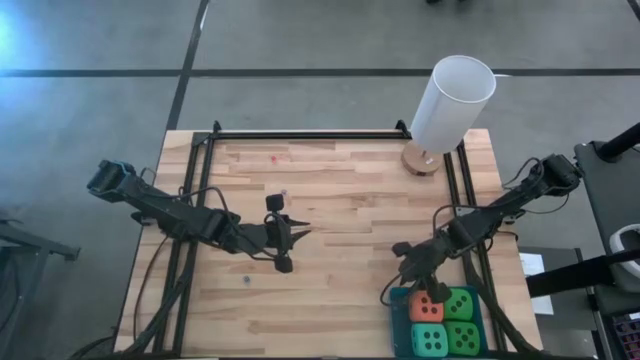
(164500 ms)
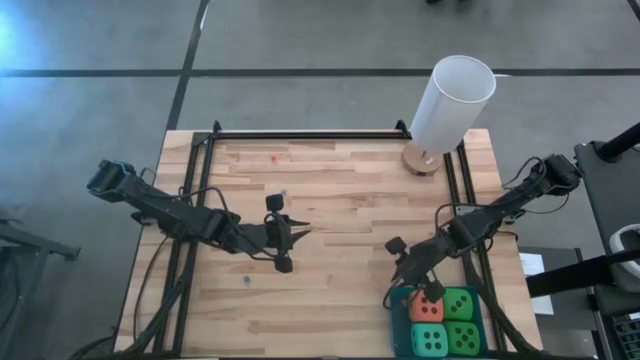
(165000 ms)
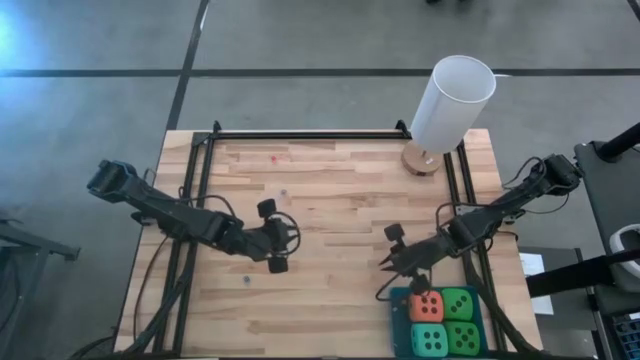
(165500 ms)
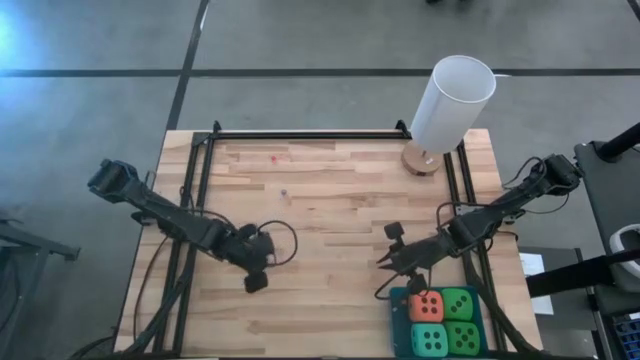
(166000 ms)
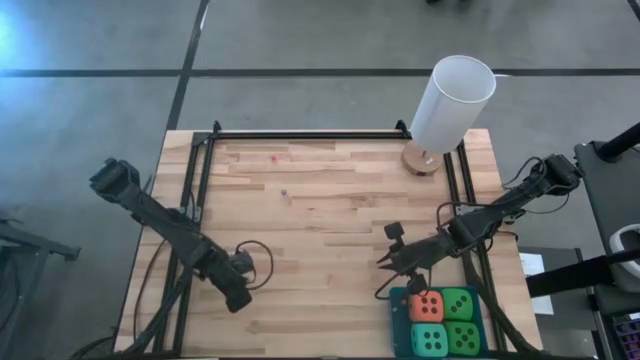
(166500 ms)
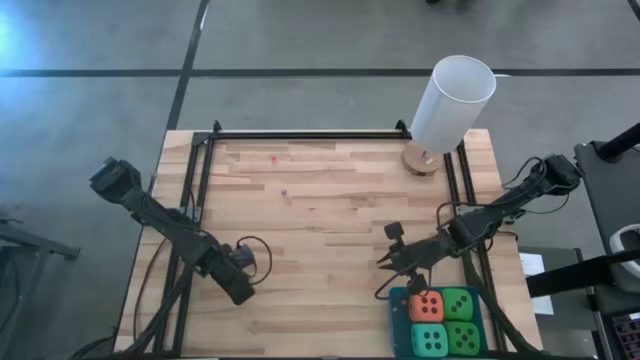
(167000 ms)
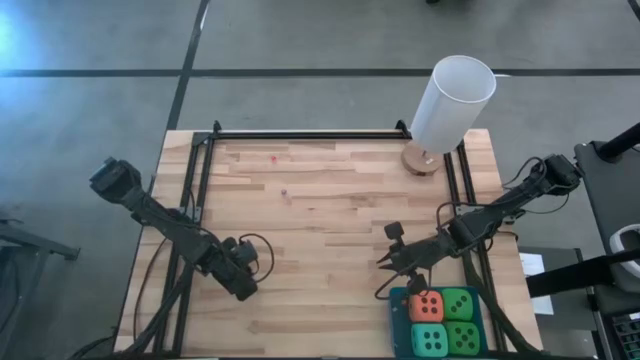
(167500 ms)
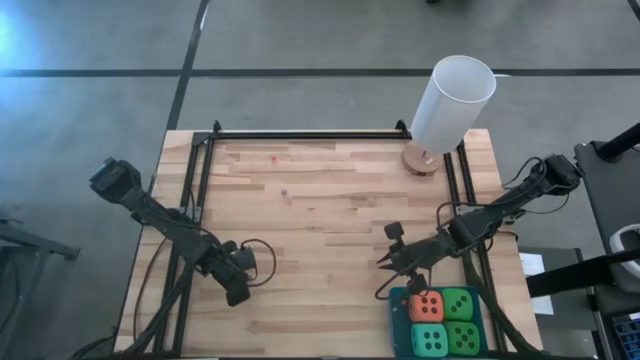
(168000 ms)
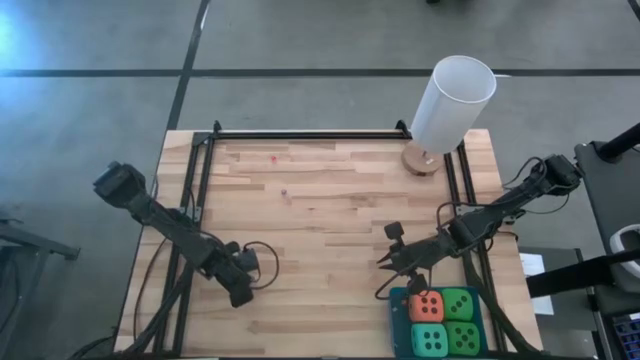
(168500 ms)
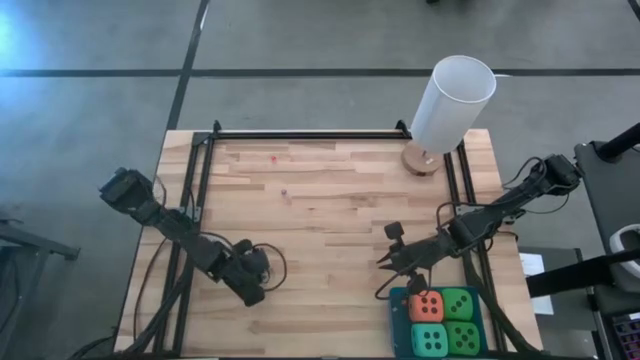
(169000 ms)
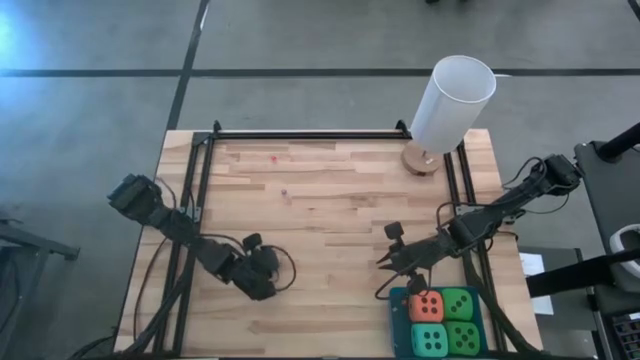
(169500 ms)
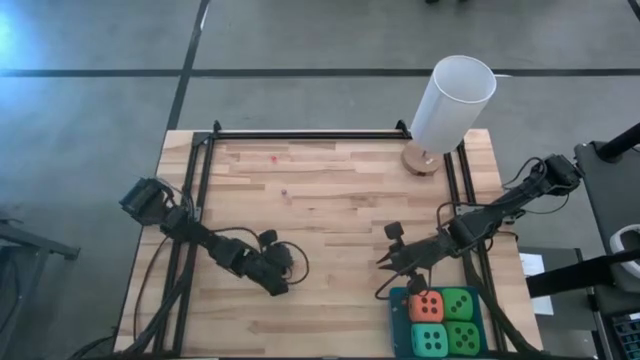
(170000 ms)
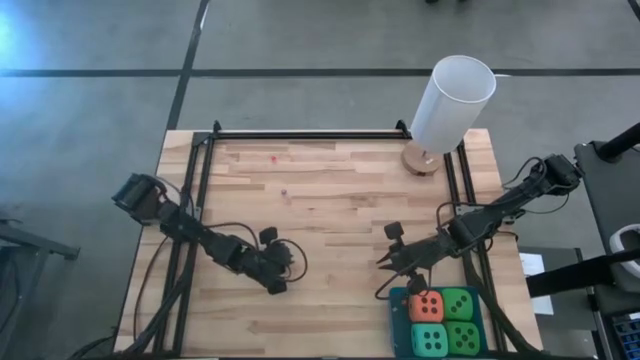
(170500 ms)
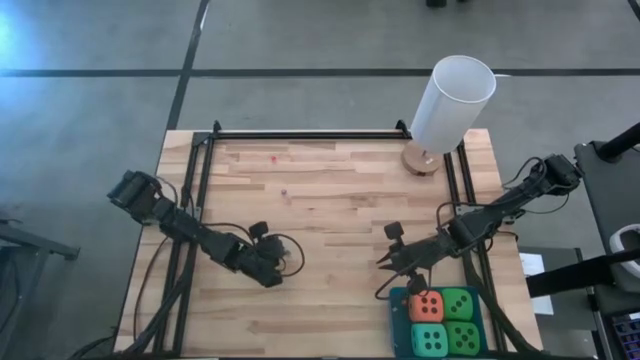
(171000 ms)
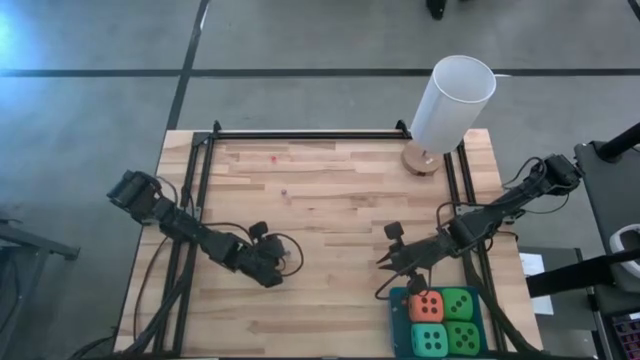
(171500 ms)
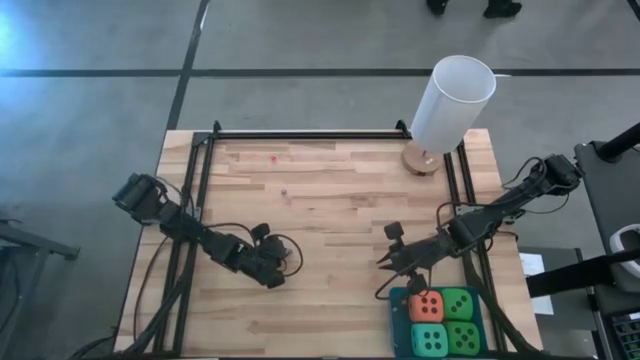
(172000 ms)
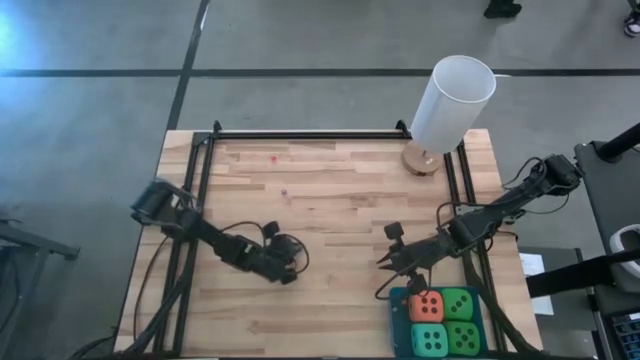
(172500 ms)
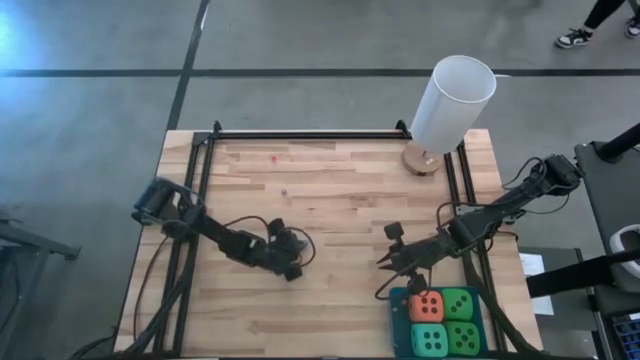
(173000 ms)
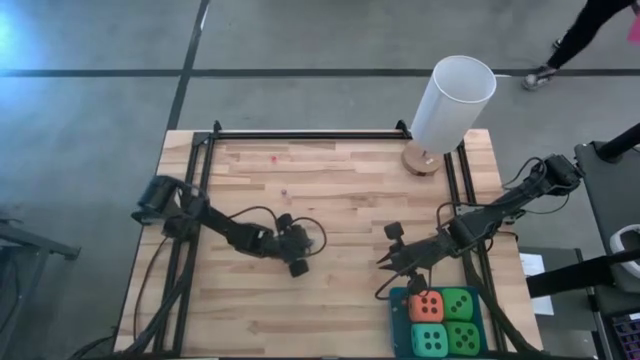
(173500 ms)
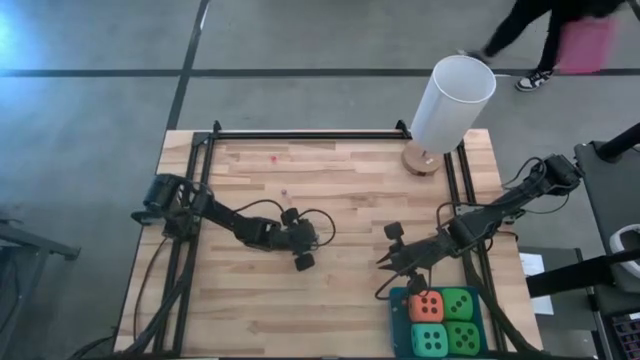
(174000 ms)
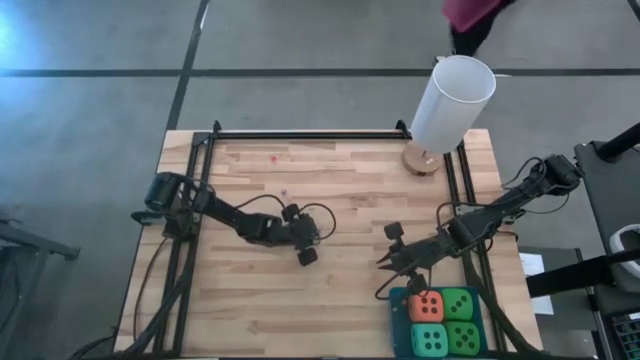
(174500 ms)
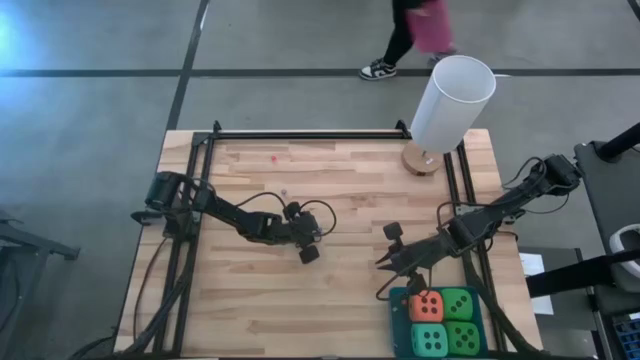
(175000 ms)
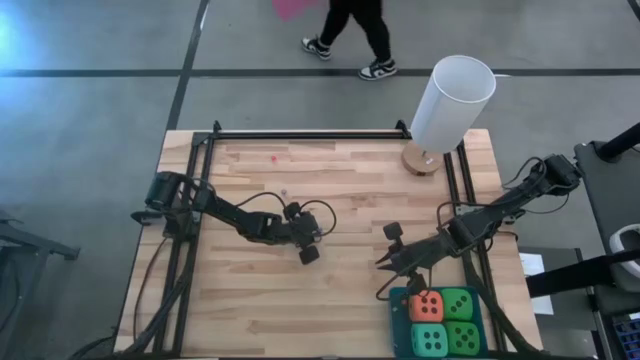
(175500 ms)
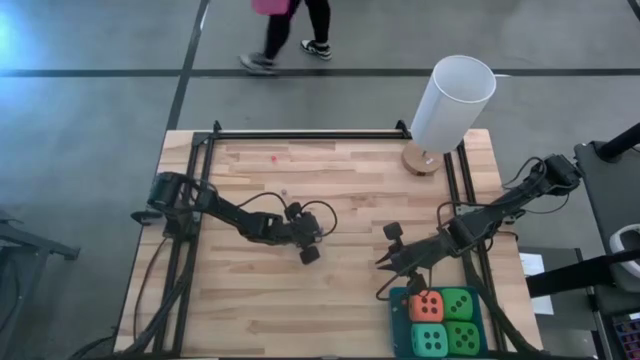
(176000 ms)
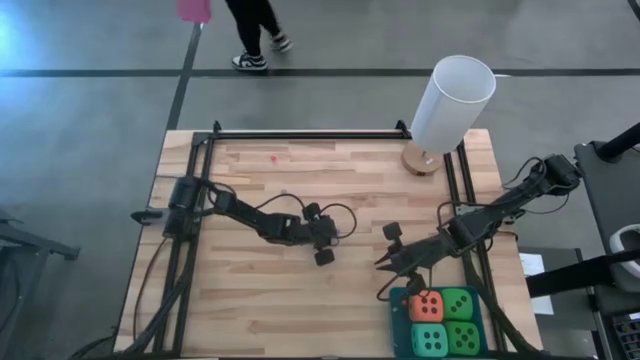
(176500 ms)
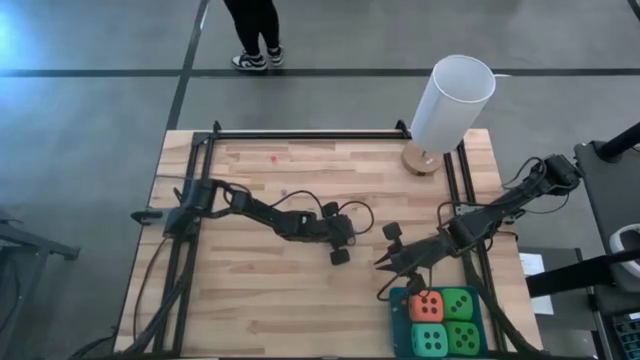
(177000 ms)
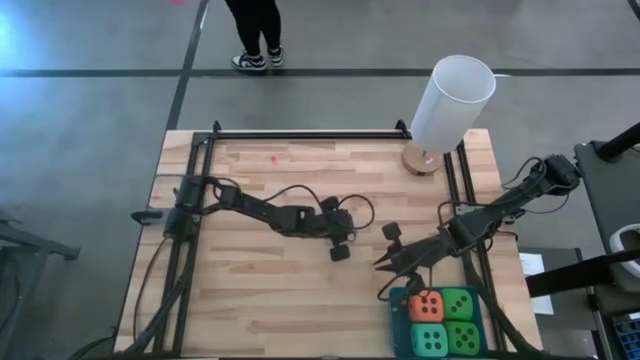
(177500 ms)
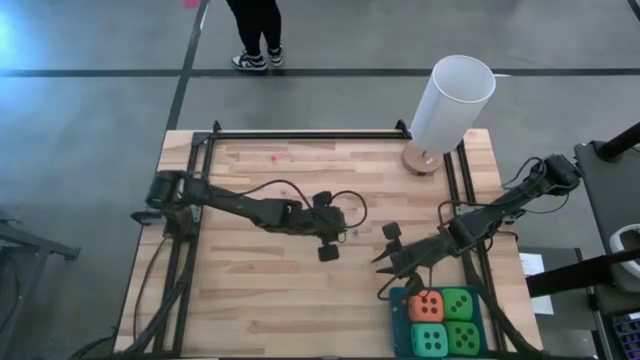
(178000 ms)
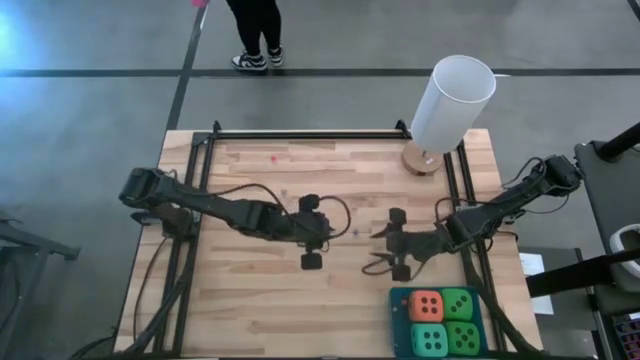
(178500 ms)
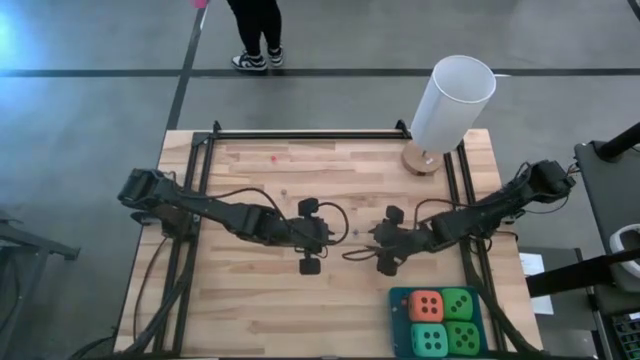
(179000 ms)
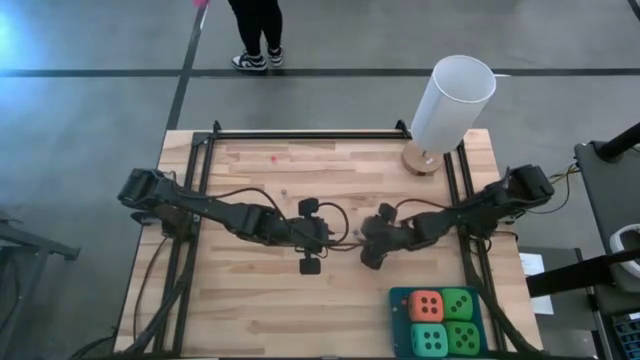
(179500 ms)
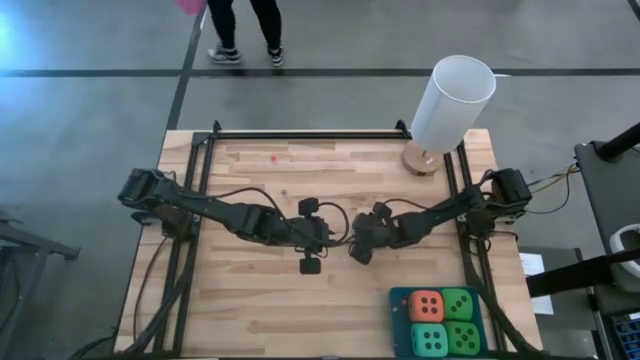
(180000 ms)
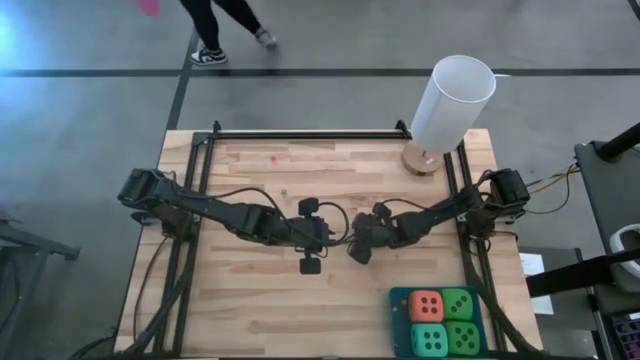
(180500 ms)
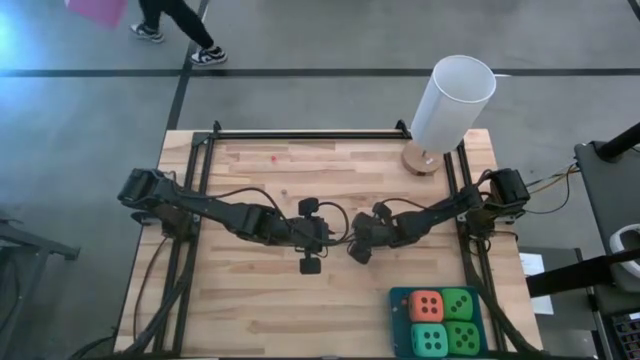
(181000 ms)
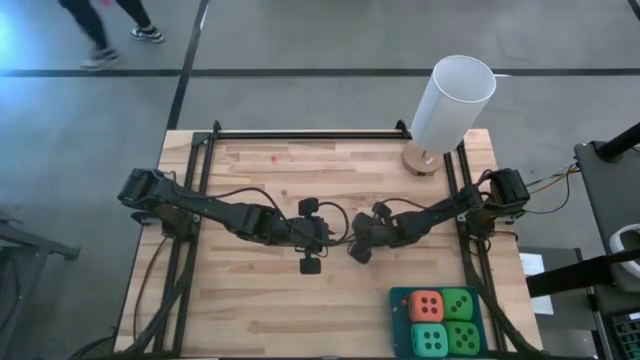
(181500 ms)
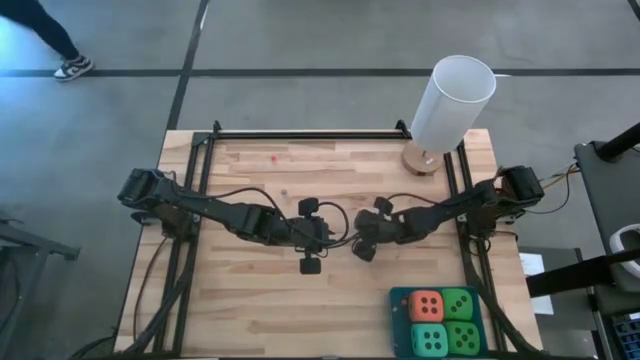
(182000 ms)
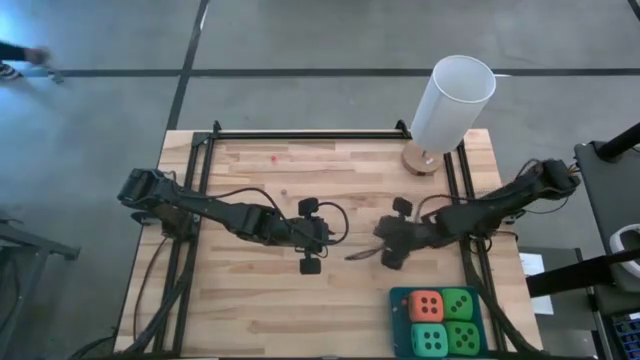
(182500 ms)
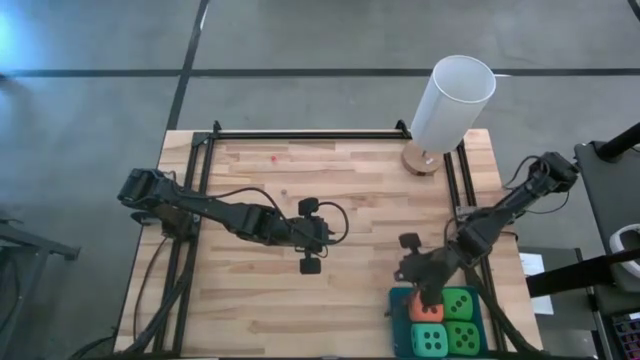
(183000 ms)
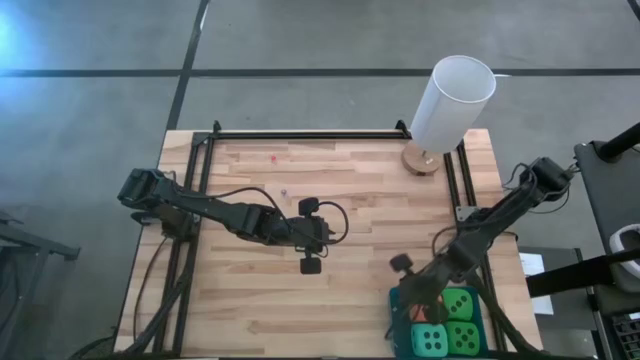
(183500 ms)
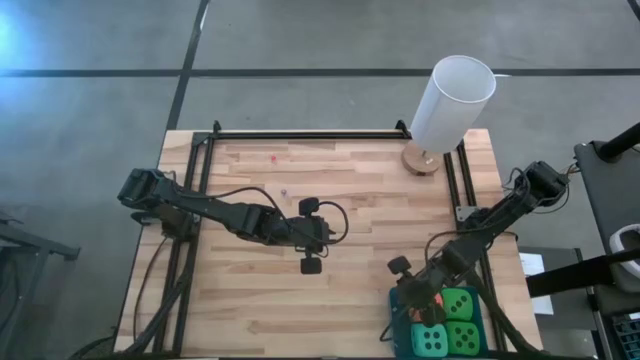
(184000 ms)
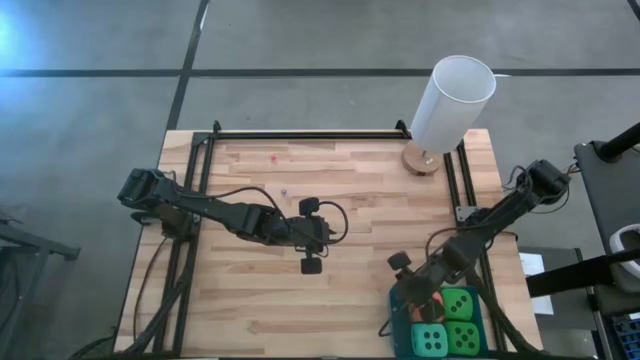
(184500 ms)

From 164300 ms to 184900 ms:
Task: Pick & Place Dice
Put the small blue die into the blue bin
